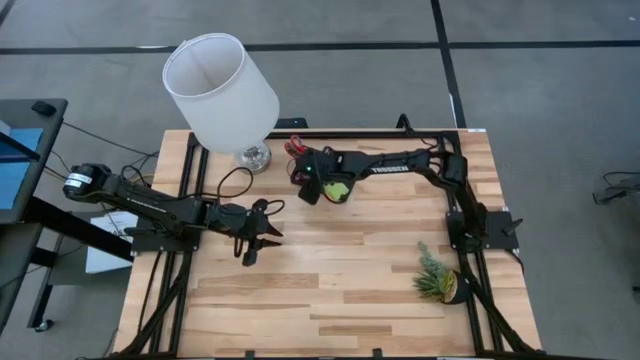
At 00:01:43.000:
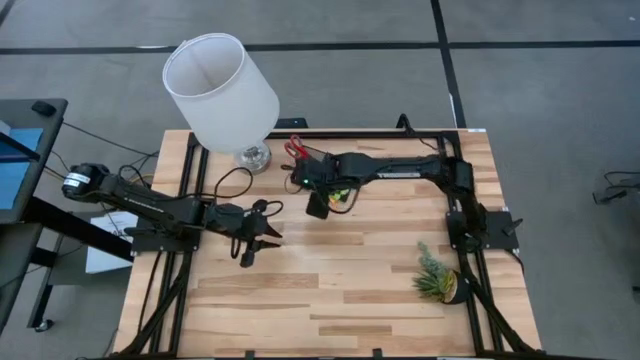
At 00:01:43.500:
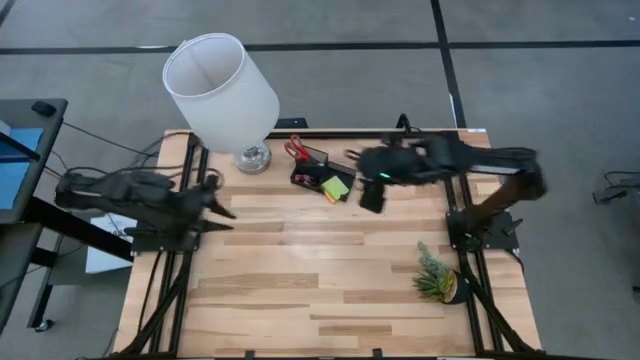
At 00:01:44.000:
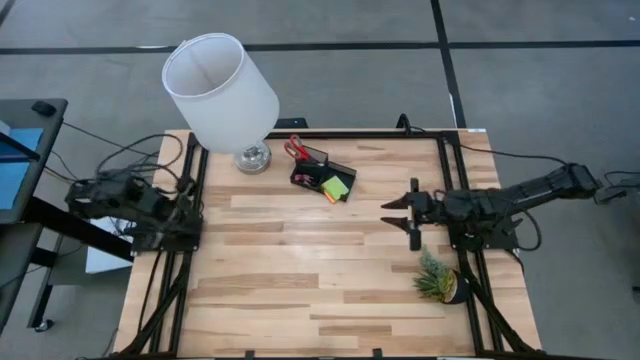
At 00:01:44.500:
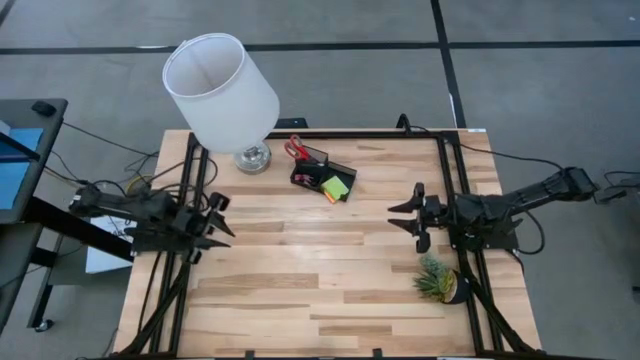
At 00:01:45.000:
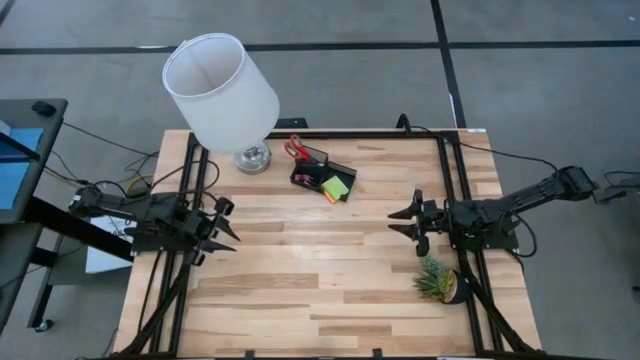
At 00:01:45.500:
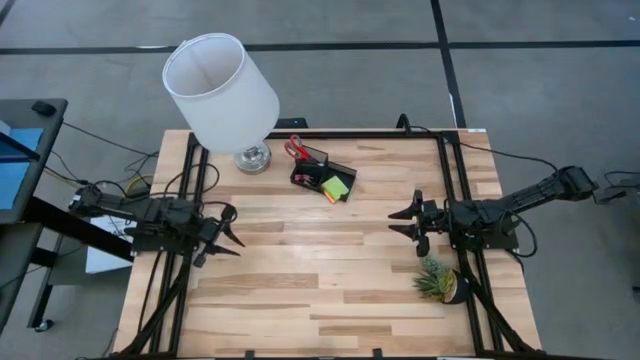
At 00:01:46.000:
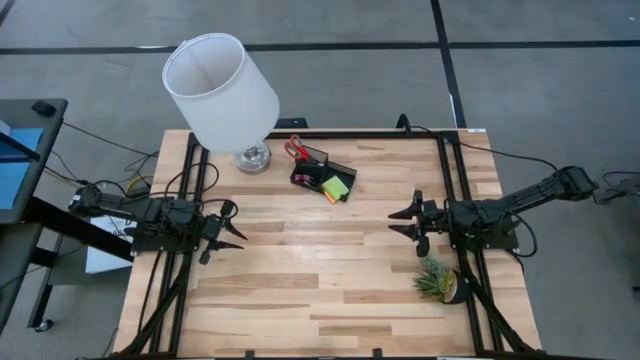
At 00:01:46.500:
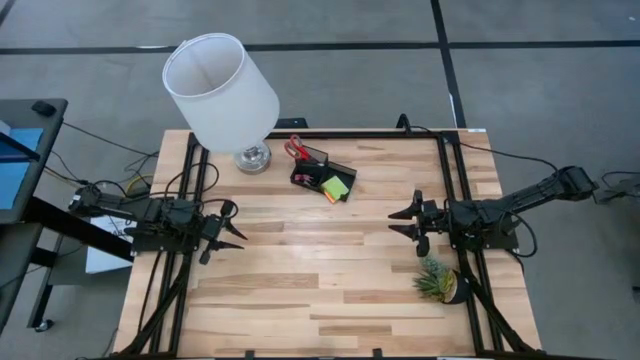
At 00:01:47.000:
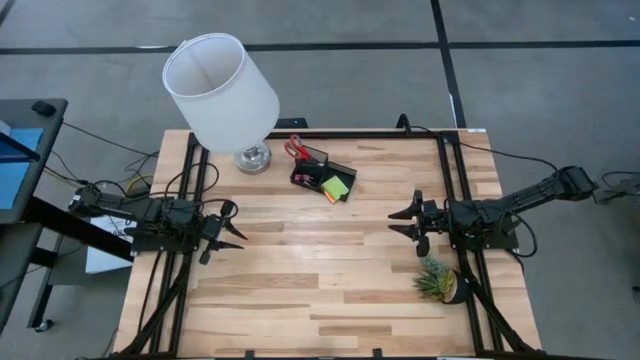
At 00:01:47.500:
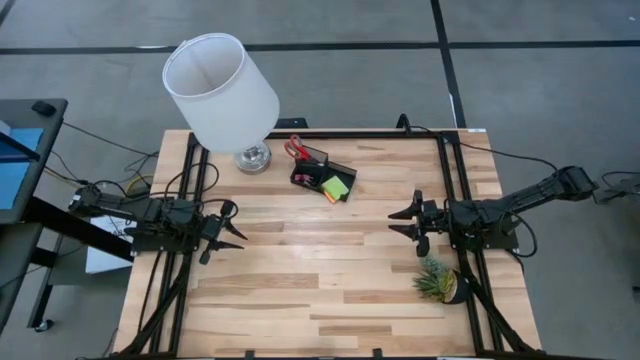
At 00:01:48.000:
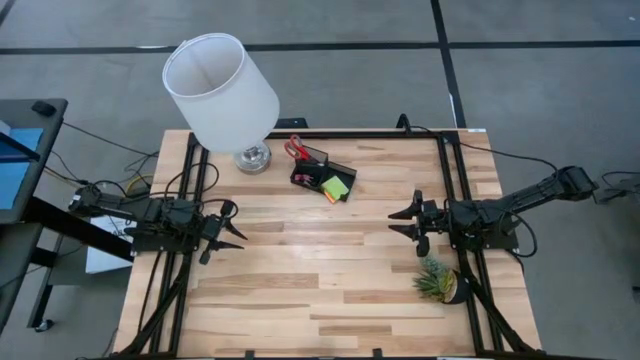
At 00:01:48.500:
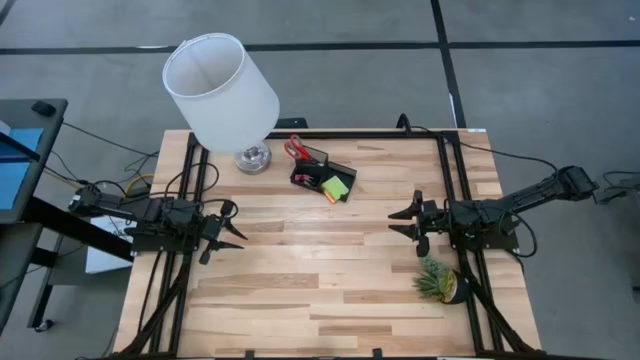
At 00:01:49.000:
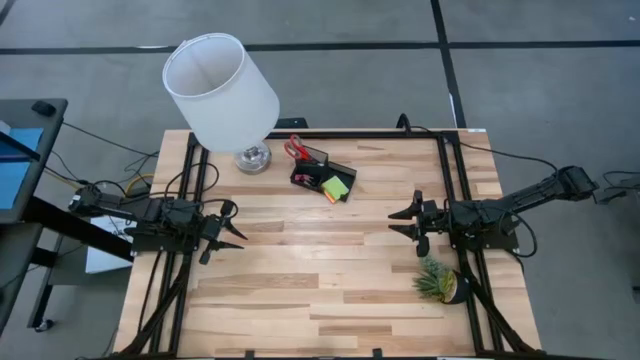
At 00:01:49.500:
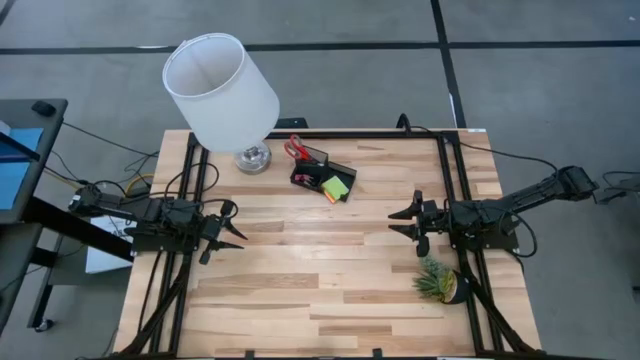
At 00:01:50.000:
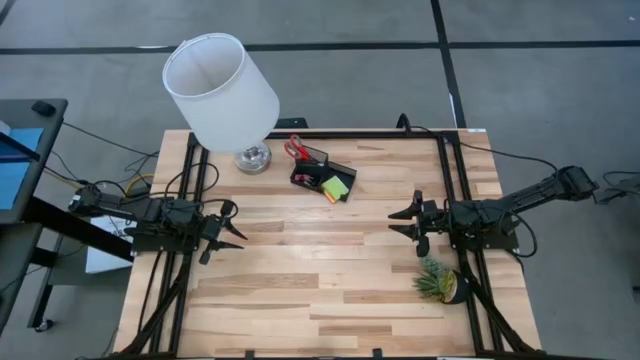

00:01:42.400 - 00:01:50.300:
Task: Pick and place office supplies into organizer
Return to Home Position

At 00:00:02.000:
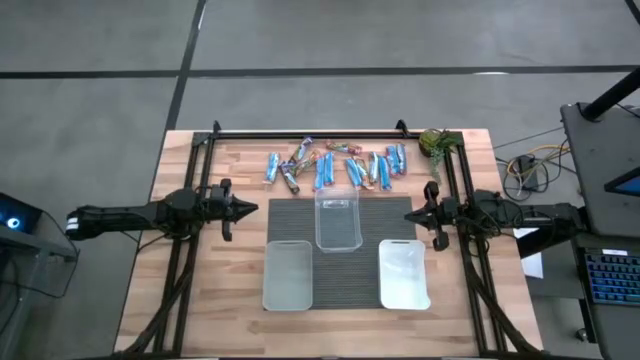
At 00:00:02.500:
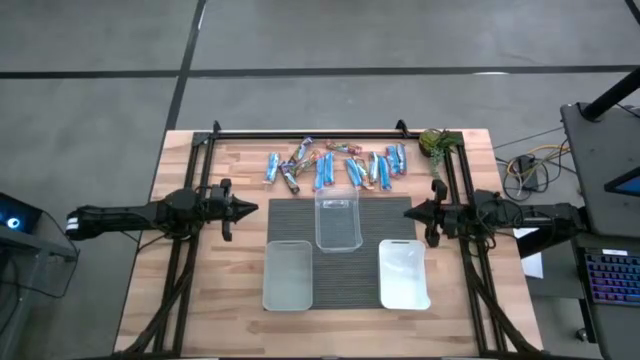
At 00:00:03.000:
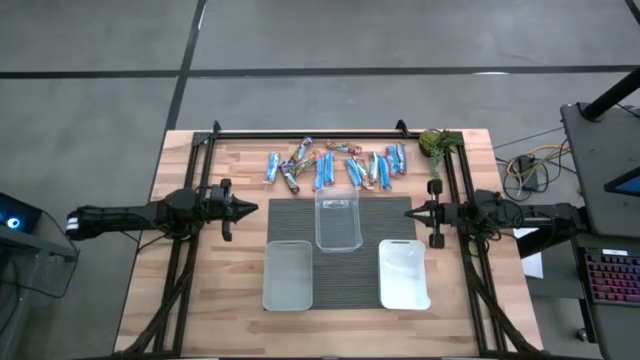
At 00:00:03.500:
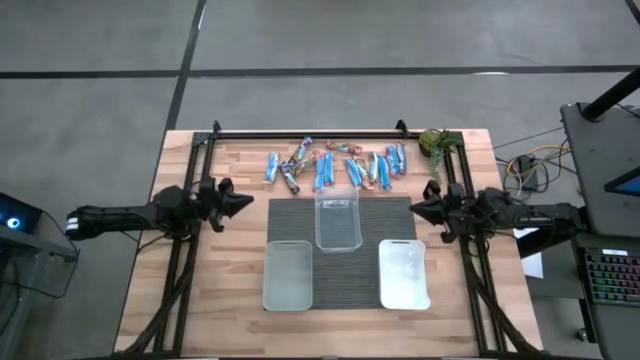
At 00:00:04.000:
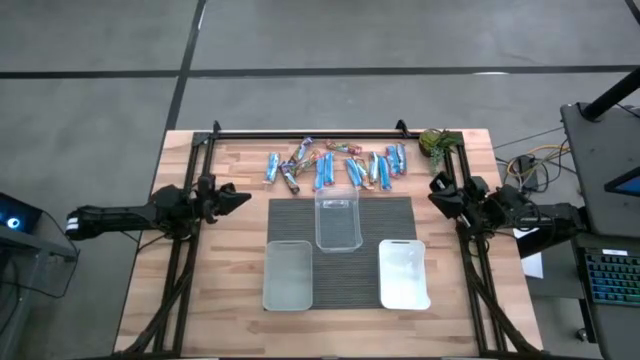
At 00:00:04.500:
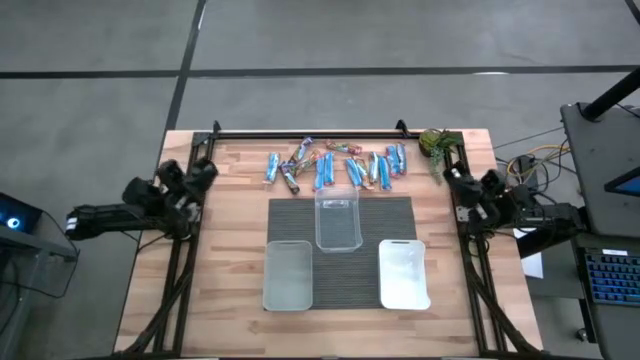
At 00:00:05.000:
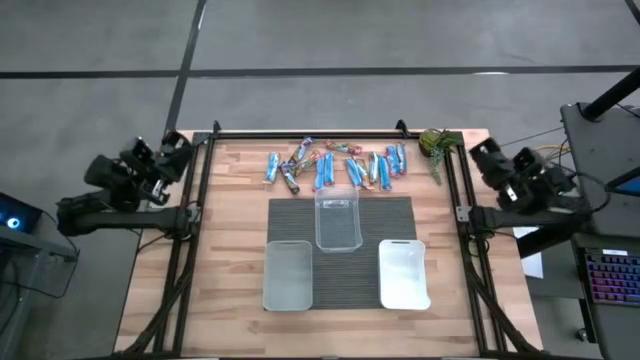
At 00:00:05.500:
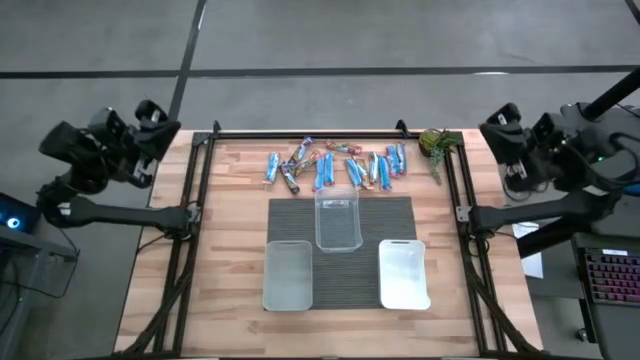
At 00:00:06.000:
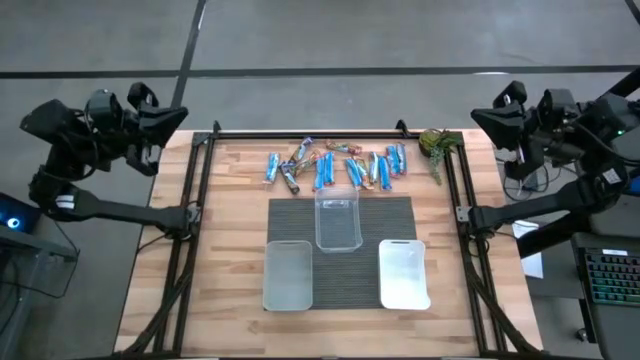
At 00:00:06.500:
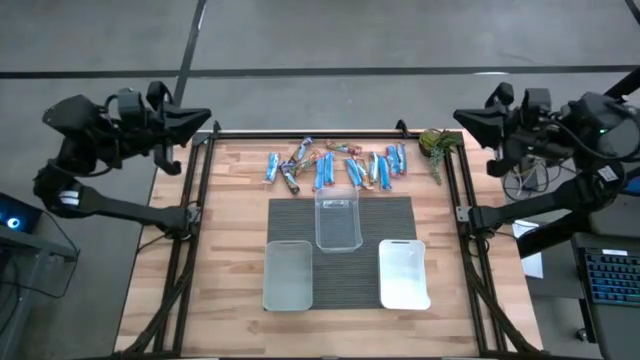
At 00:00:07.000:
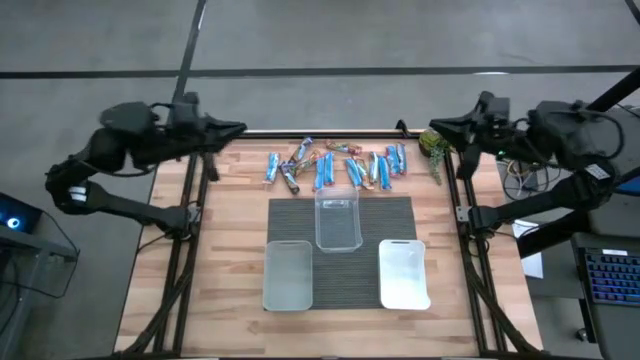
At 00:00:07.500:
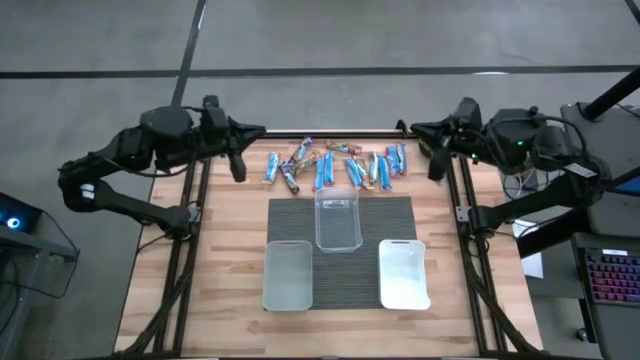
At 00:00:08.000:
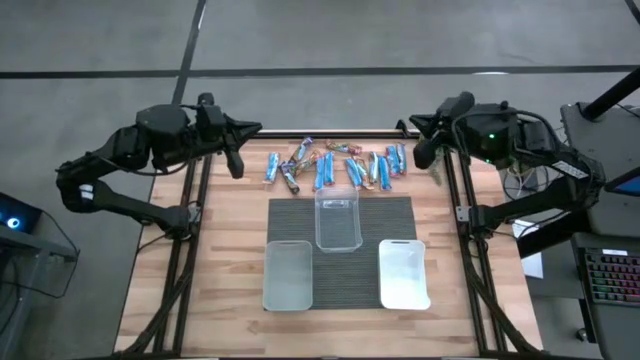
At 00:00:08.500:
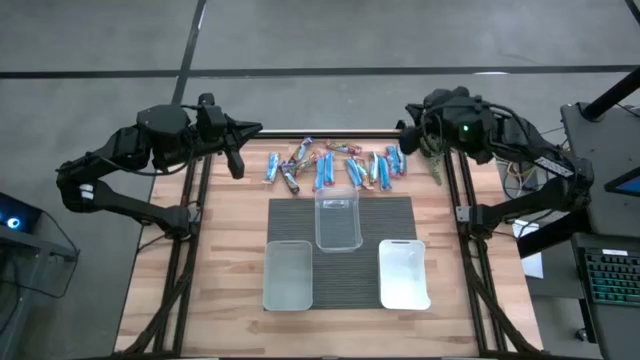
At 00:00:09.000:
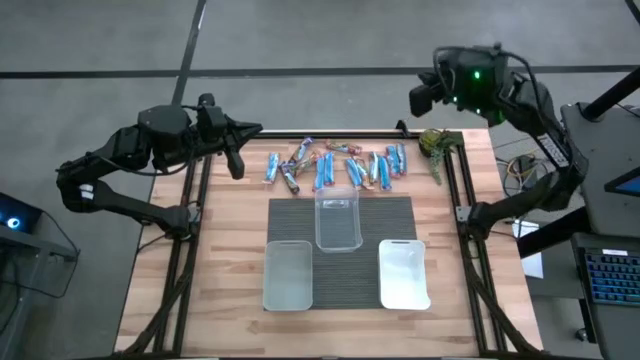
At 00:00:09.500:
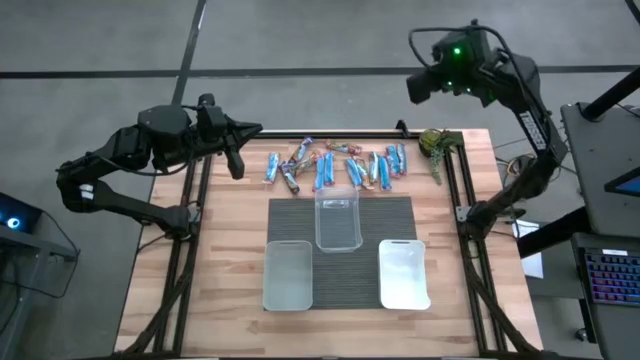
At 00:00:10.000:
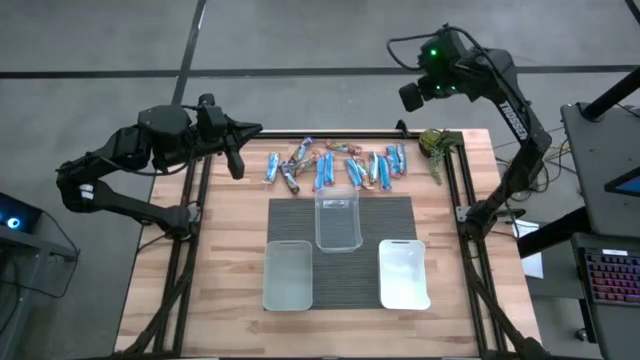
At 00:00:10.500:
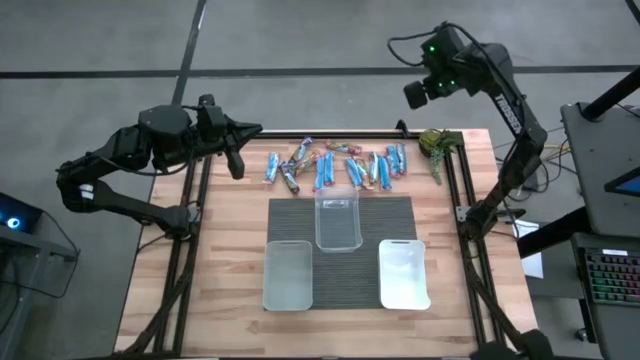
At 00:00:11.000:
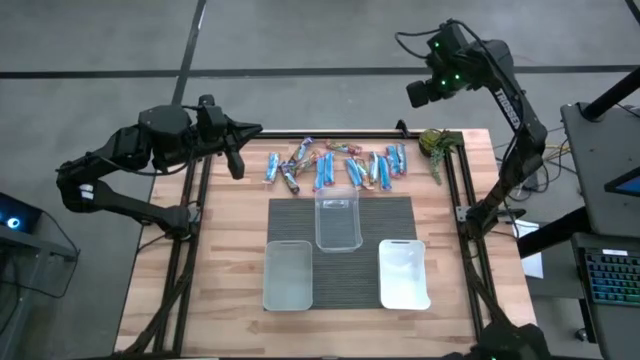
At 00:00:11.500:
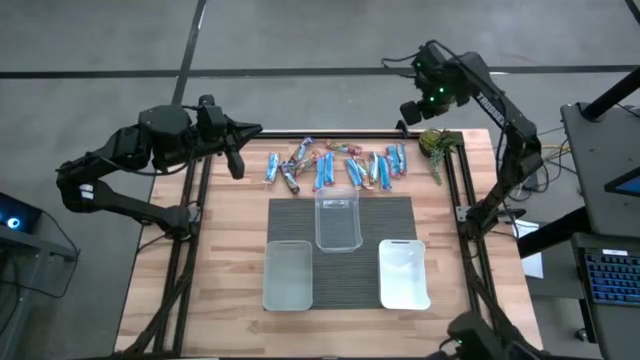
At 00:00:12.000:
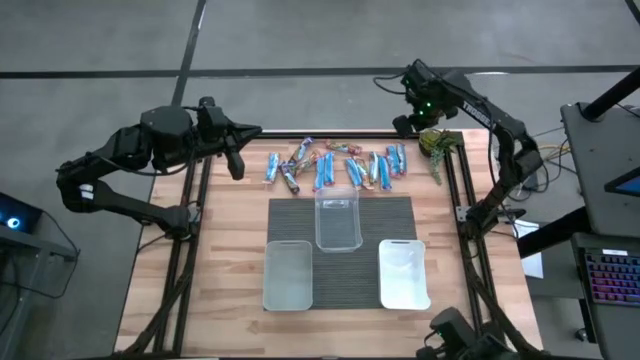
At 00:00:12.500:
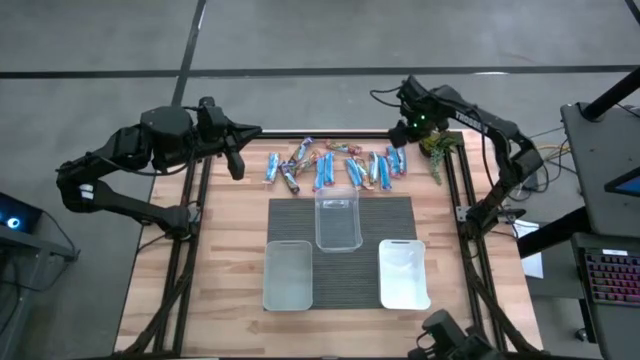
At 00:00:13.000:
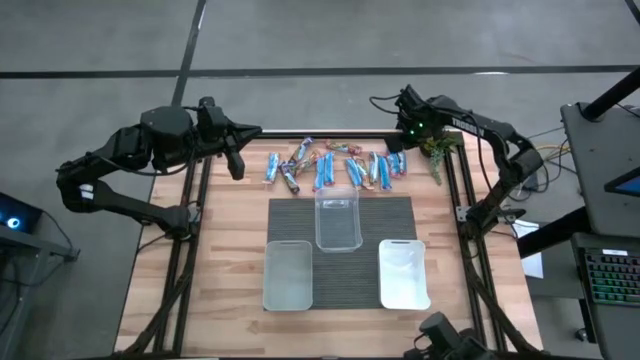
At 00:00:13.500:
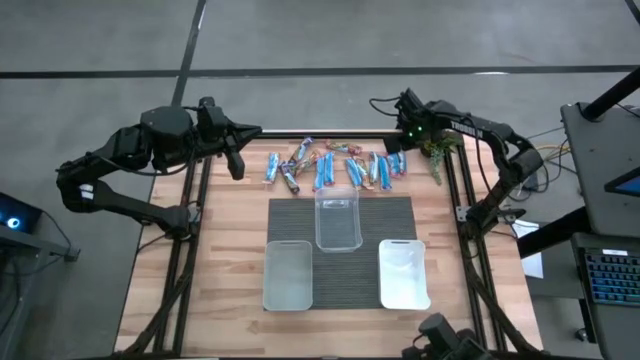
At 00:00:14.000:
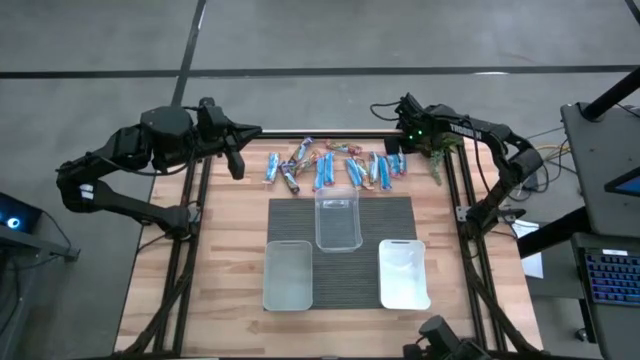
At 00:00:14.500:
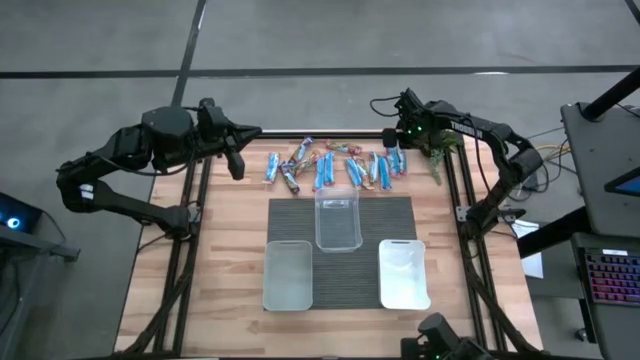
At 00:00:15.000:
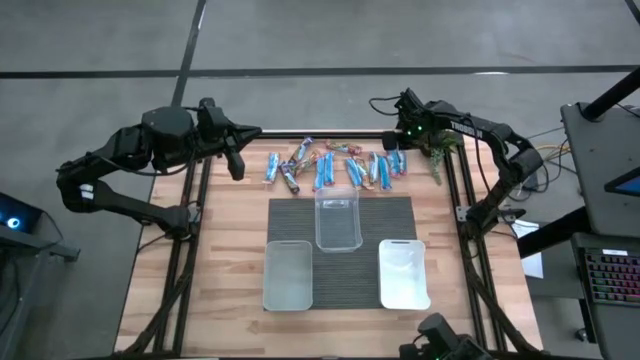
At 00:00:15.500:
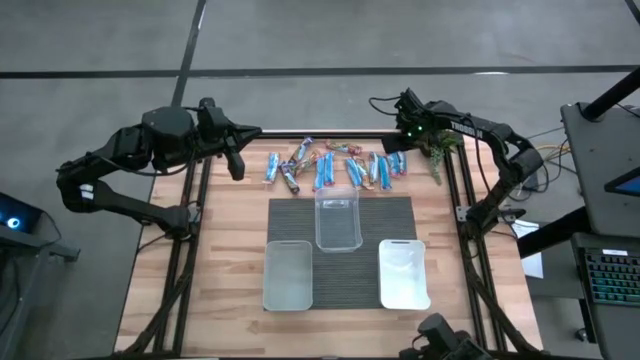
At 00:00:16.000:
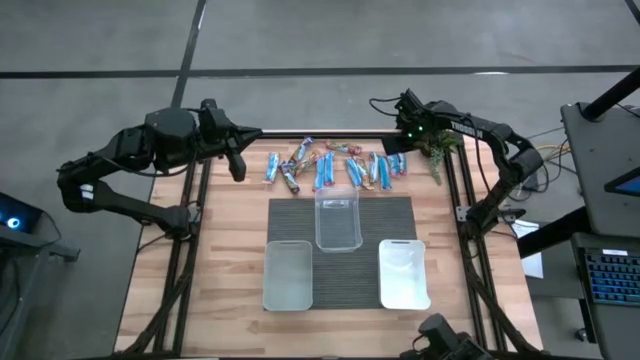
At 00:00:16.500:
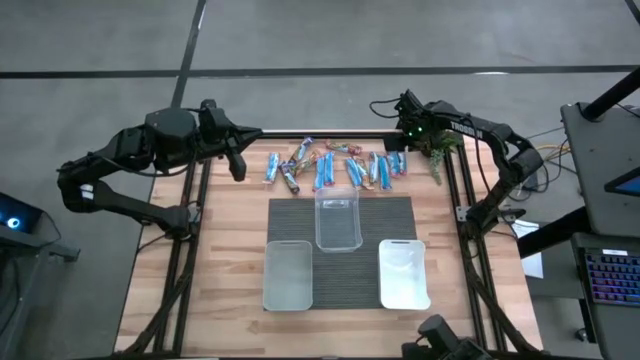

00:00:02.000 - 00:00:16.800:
Task: Pick and place Granola Bars by type
Put the red granola bar into the gray bin
